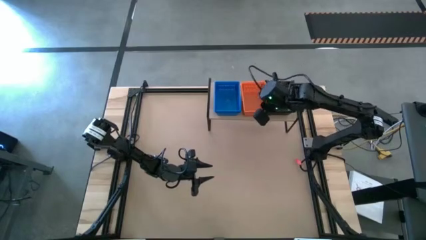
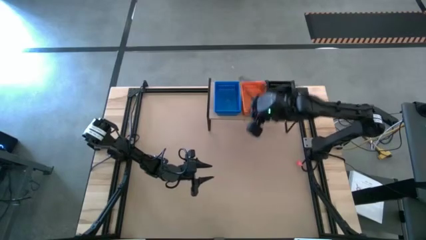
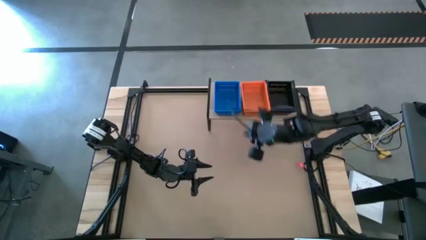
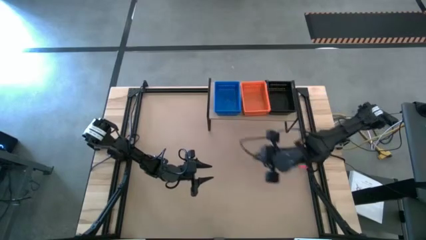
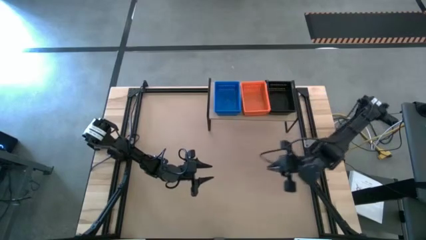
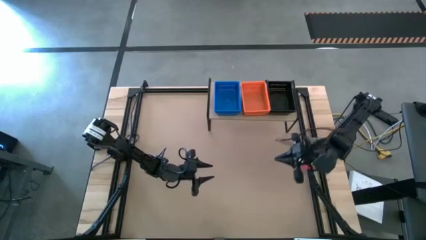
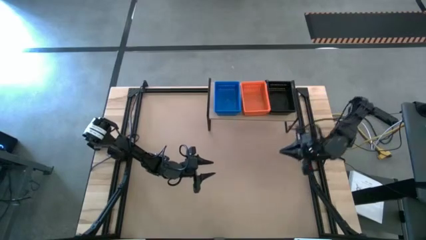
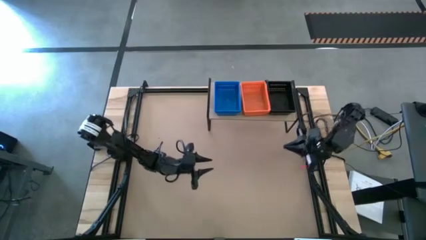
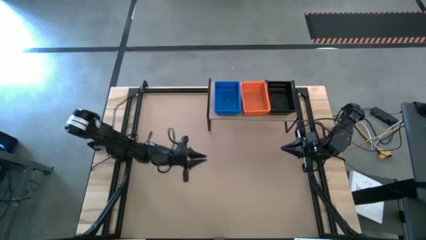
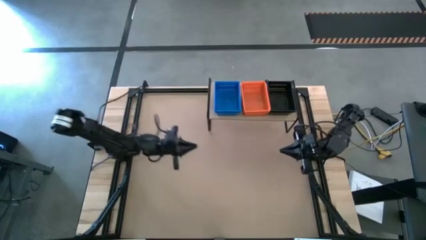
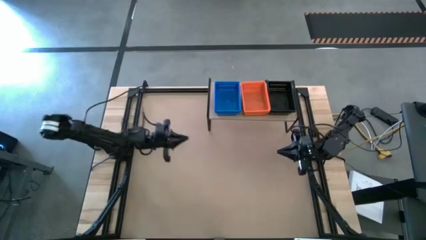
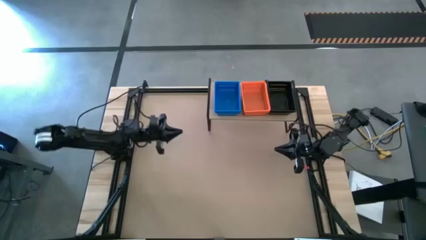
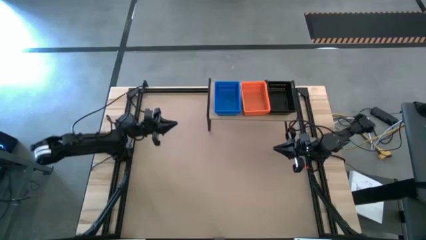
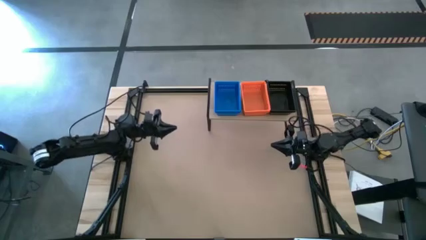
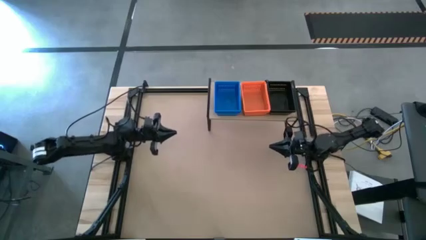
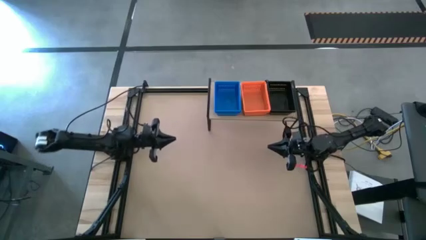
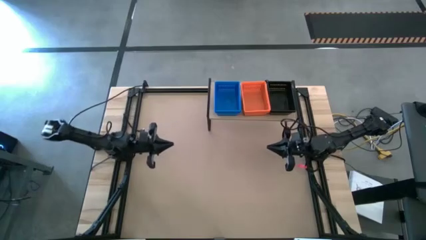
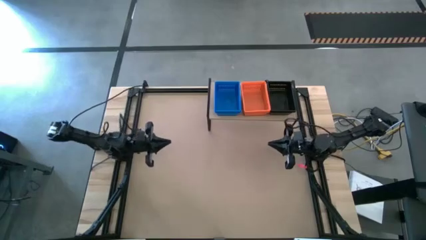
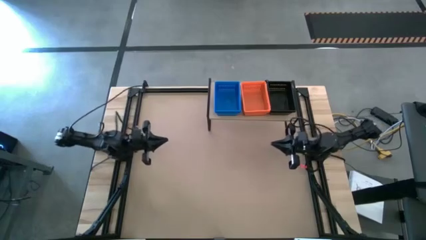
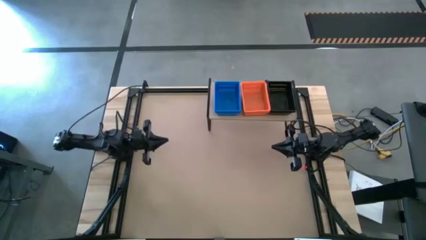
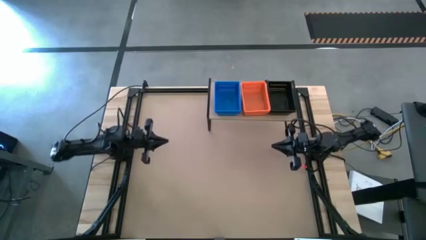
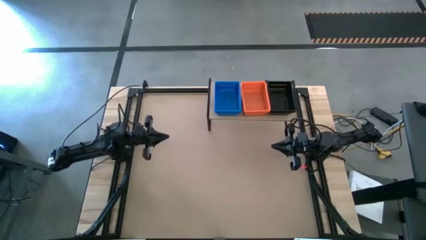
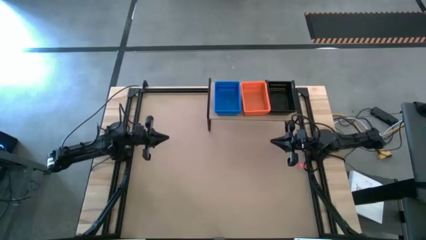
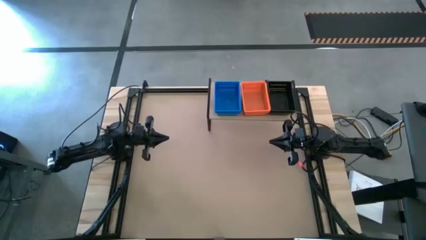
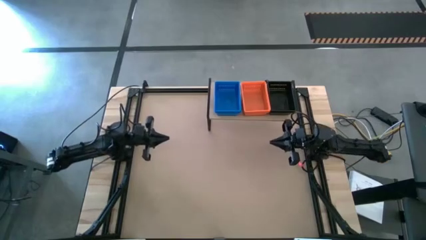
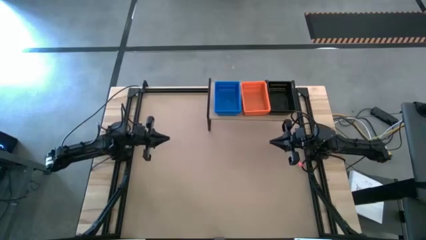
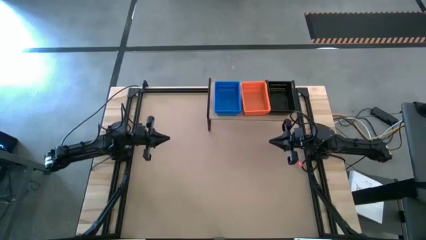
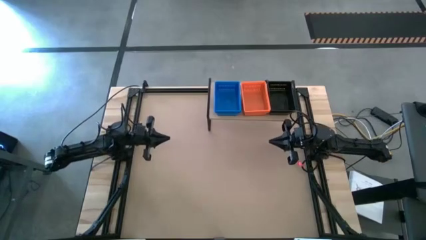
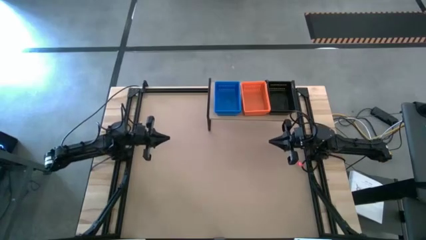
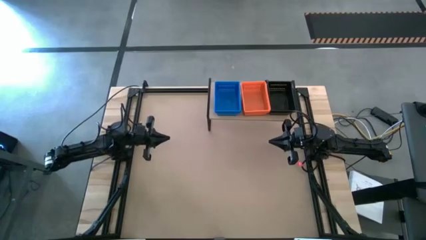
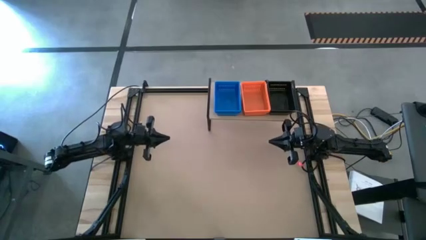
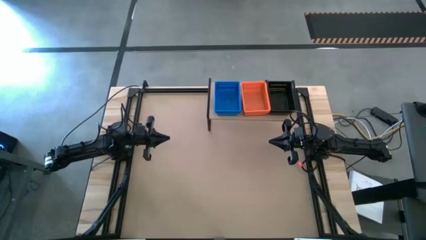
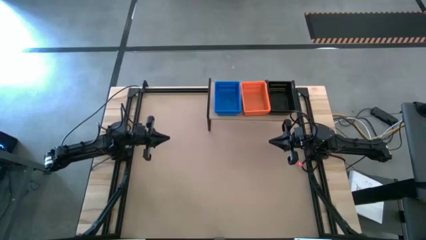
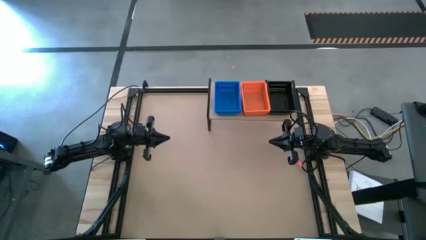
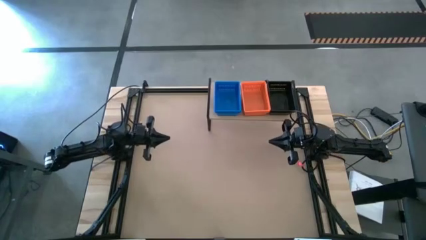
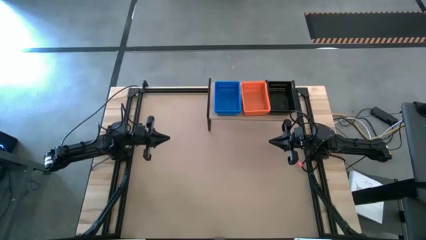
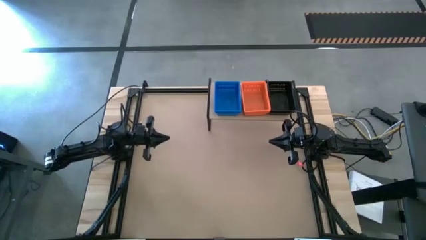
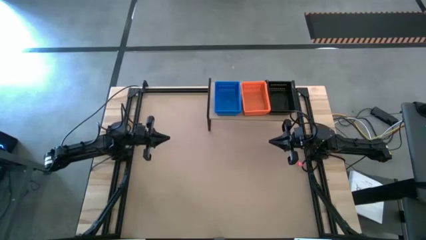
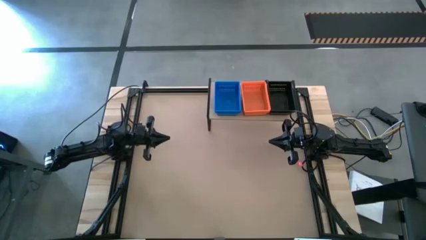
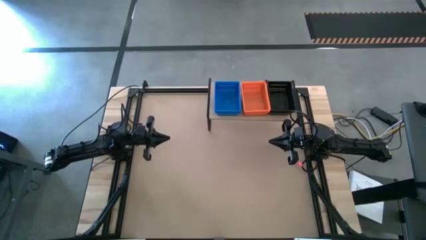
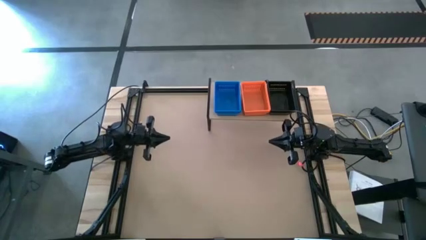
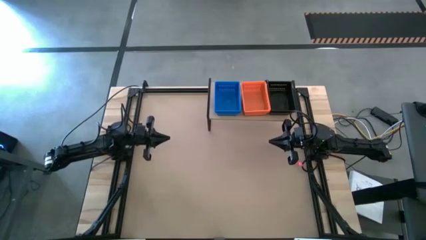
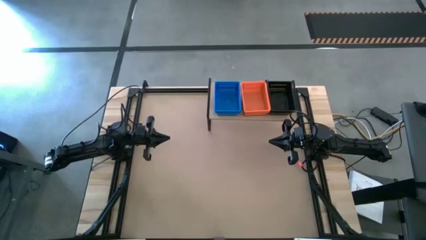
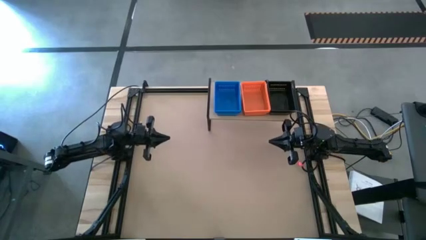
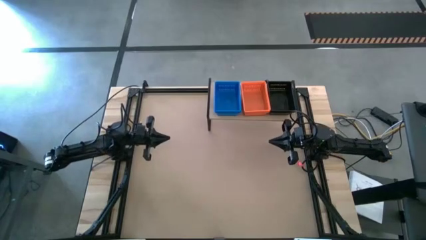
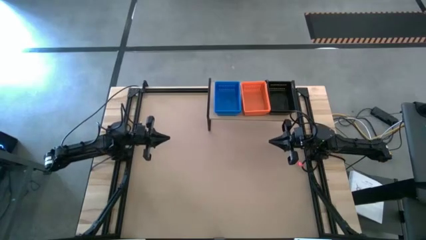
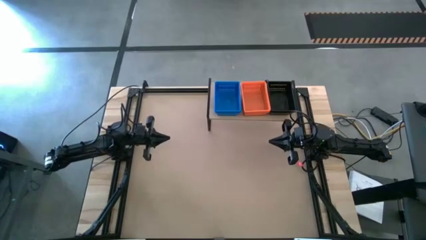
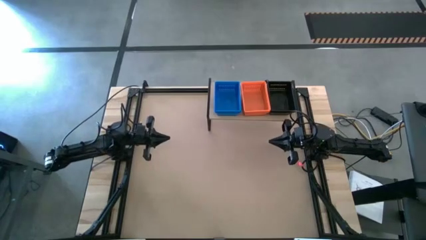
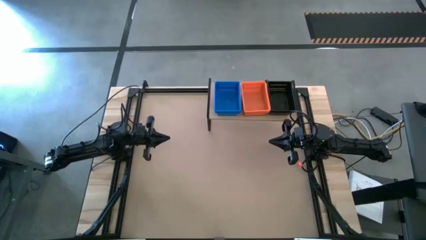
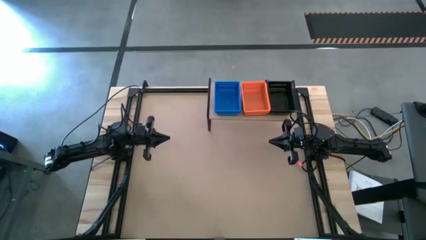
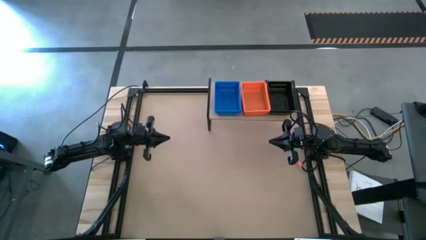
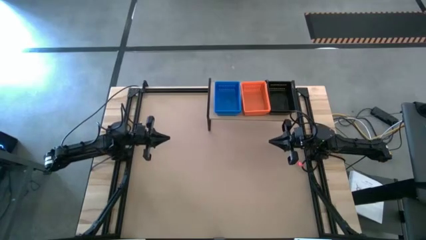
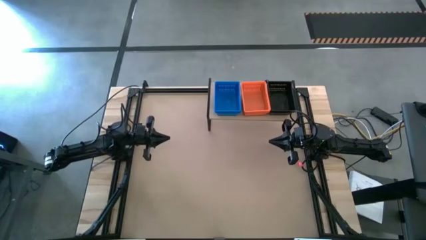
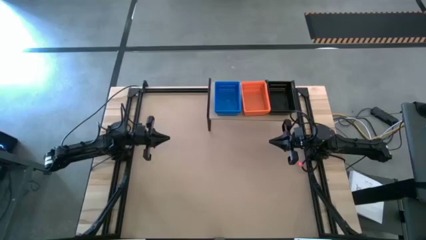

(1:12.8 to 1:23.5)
Task: Stack baskets on shelf by color
Return to Home Position

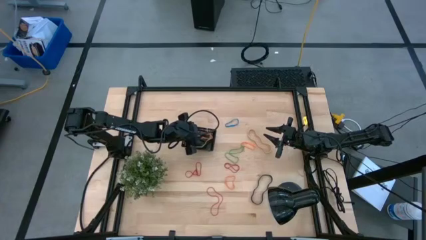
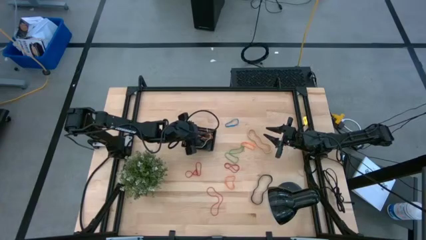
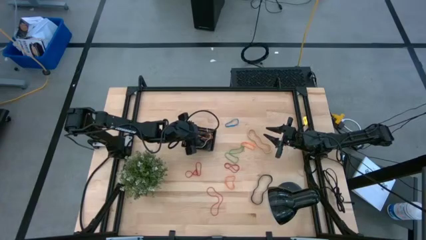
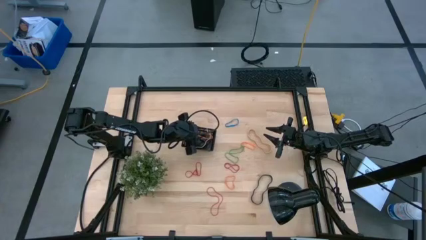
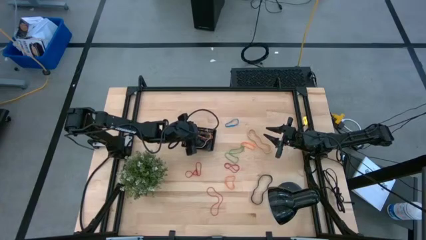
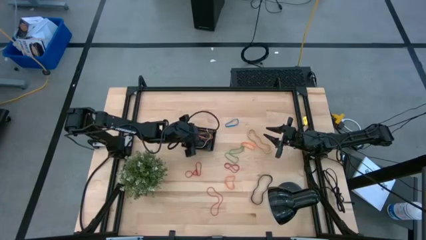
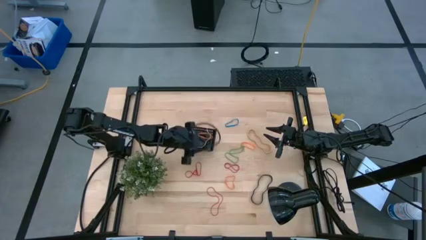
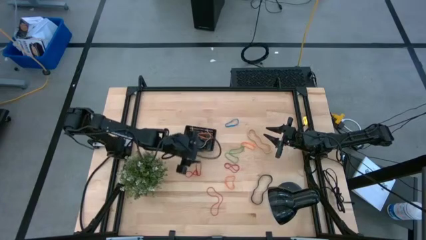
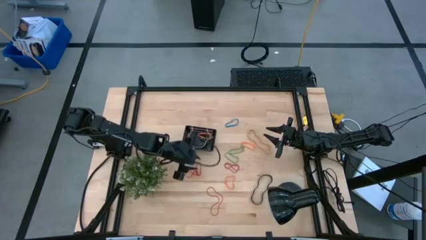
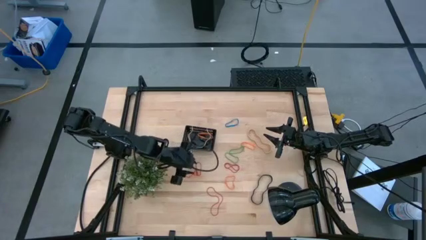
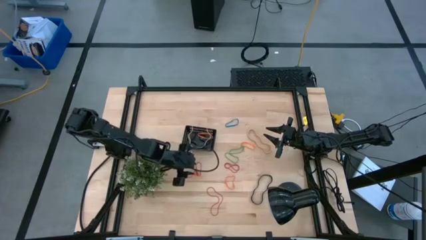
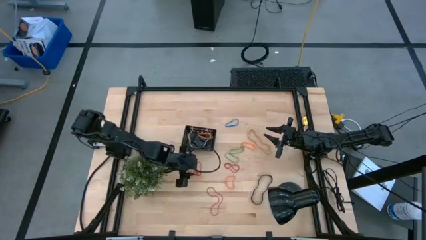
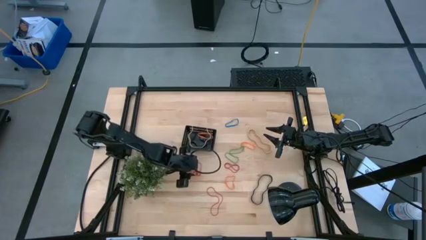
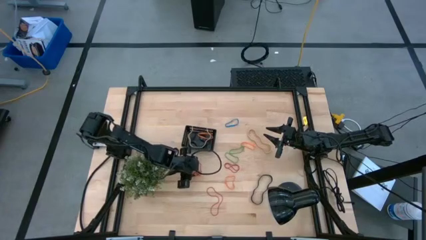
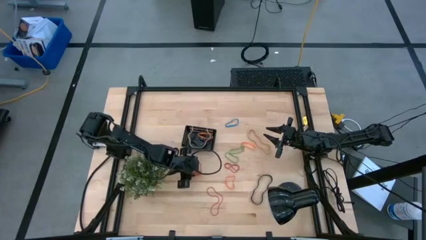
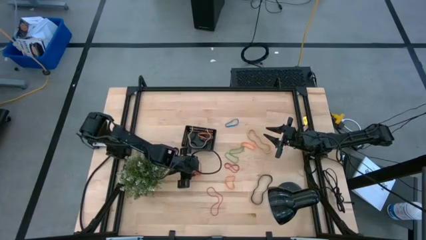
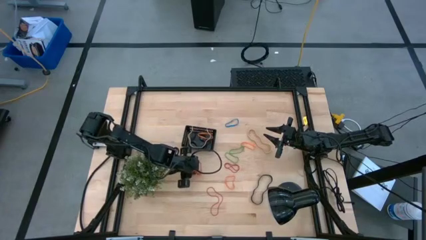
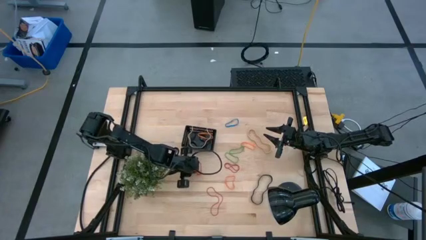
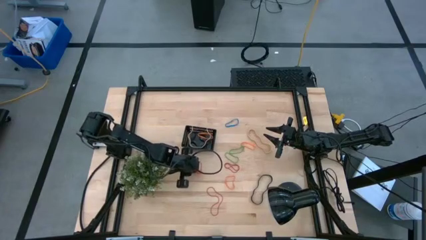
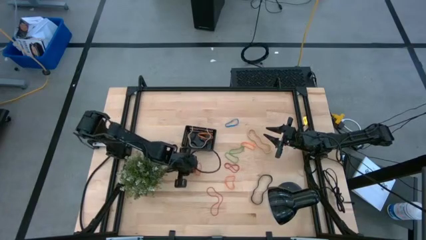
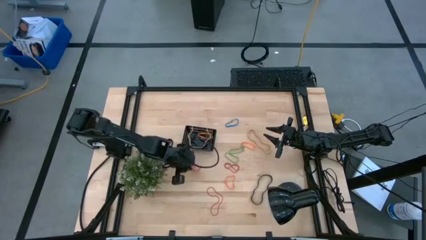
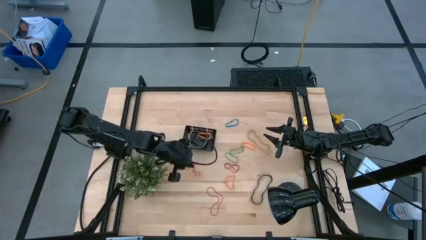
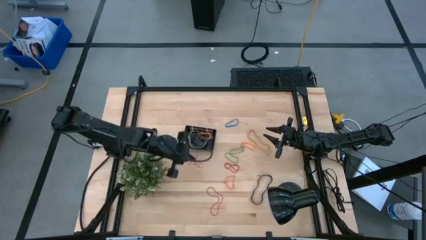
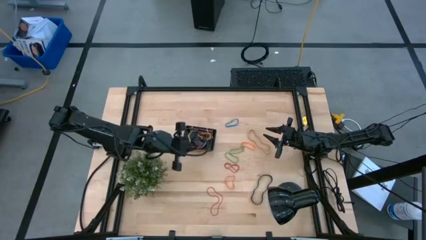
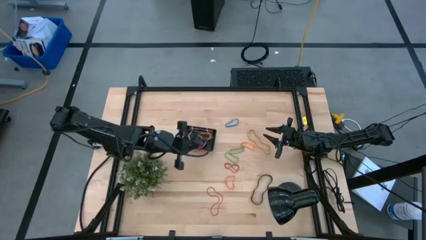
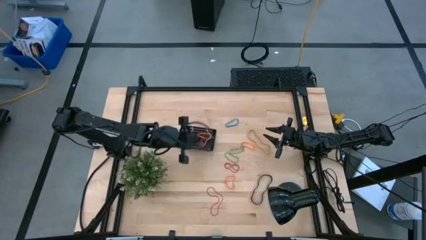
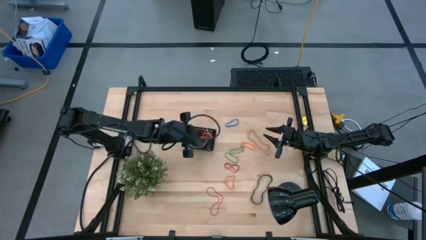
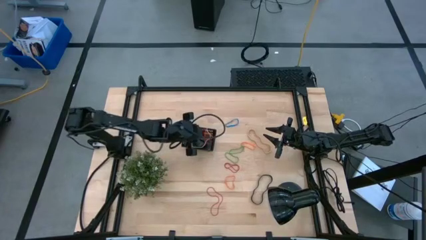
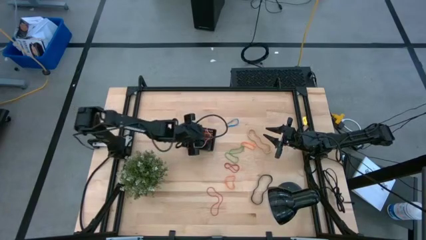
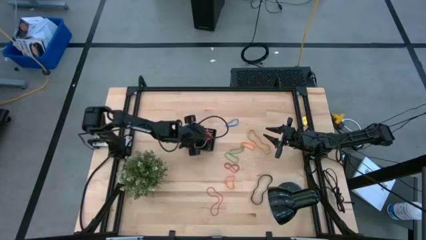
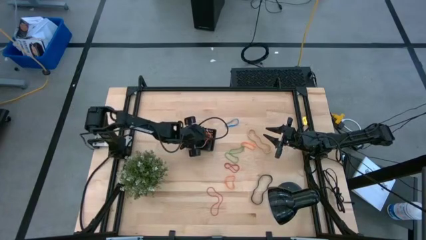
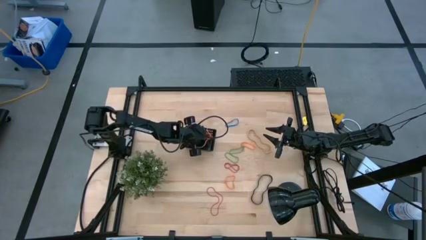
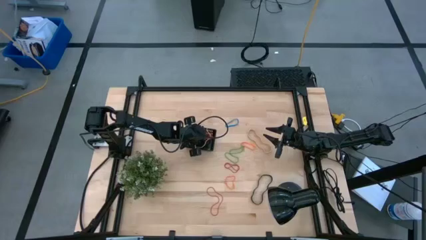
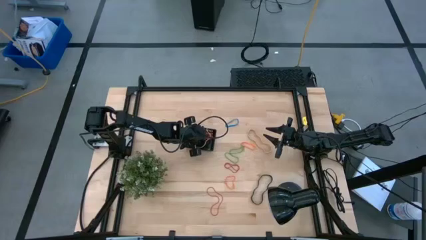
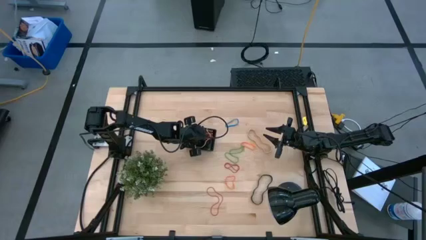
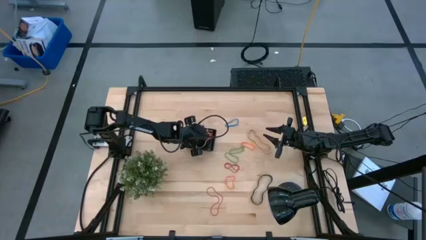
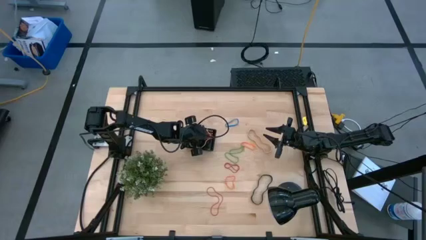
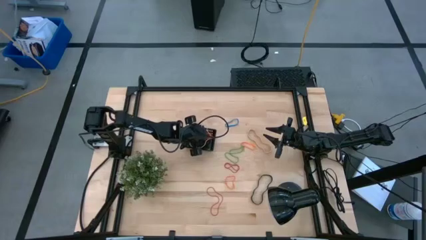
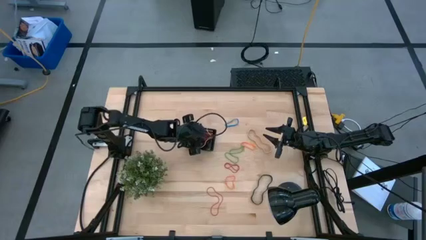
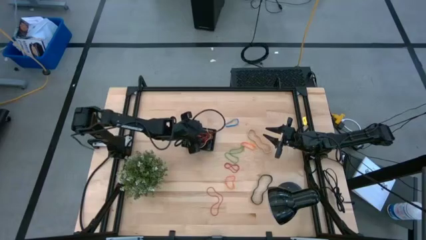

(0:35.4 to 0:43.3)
Task: Pick and place rubber bands into bin
Put the top left red rubber band into the black bin
